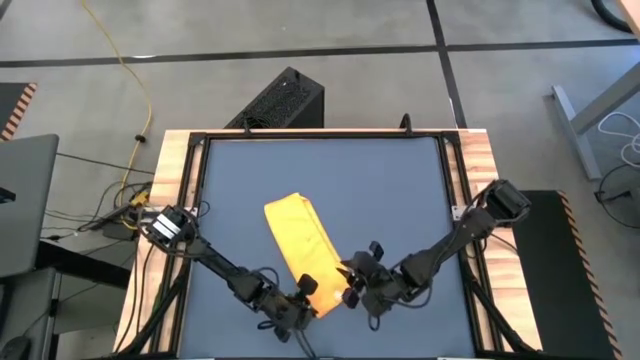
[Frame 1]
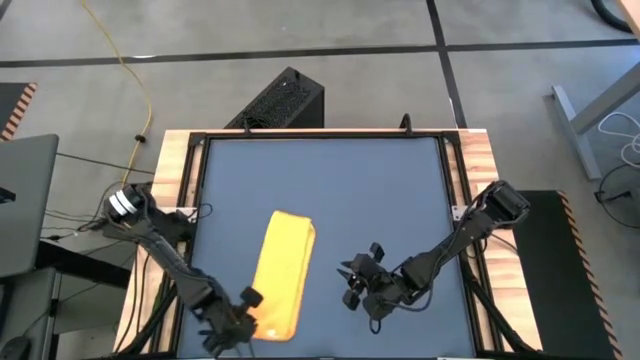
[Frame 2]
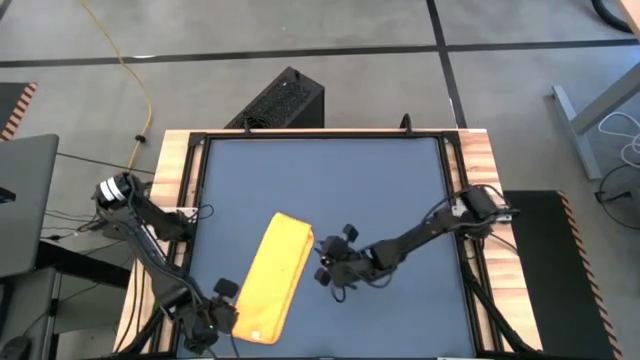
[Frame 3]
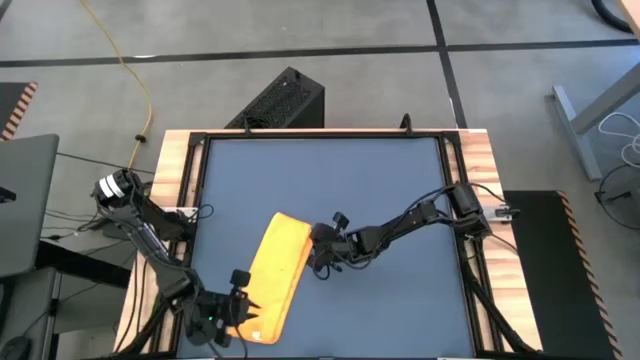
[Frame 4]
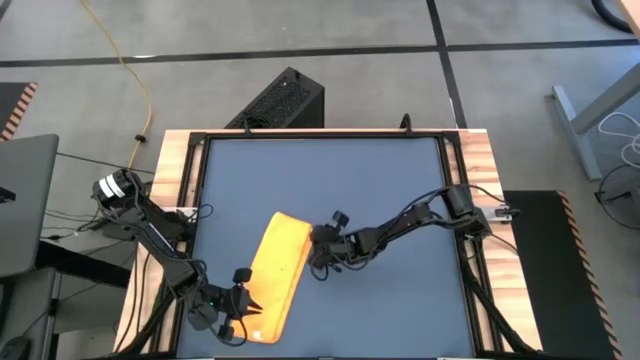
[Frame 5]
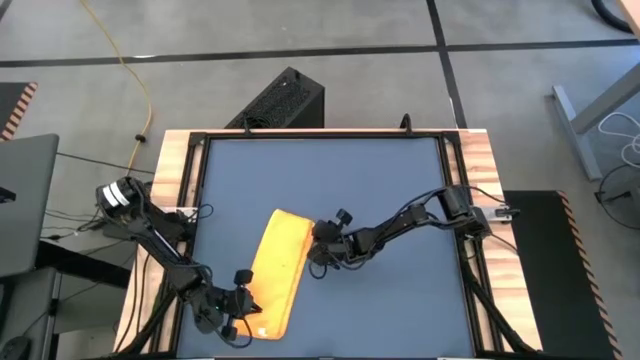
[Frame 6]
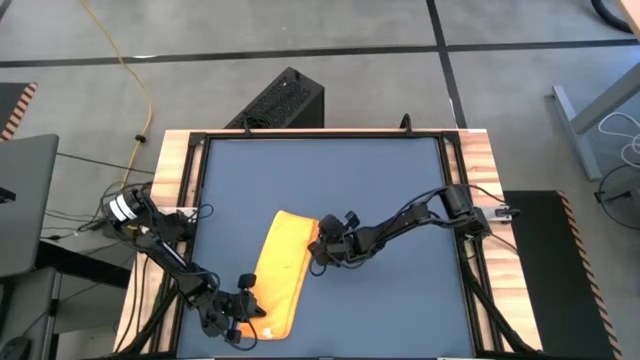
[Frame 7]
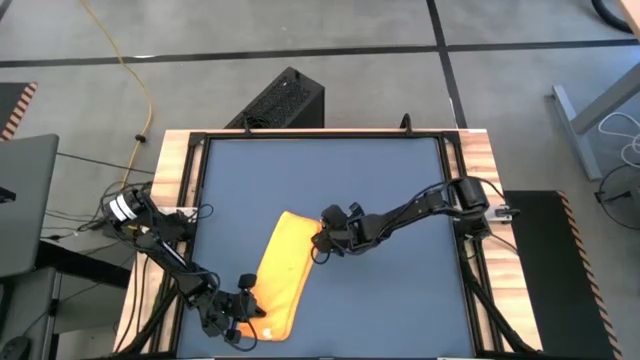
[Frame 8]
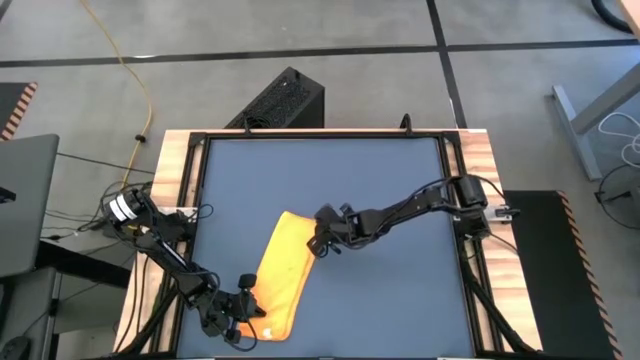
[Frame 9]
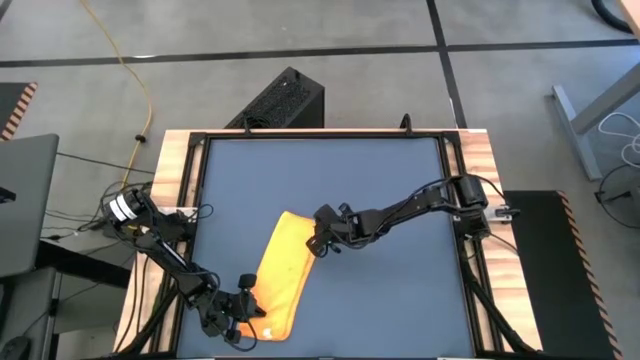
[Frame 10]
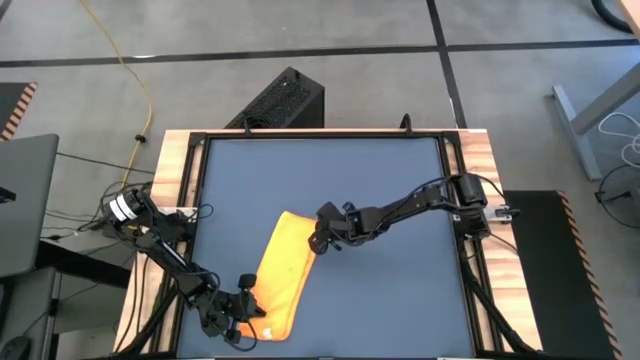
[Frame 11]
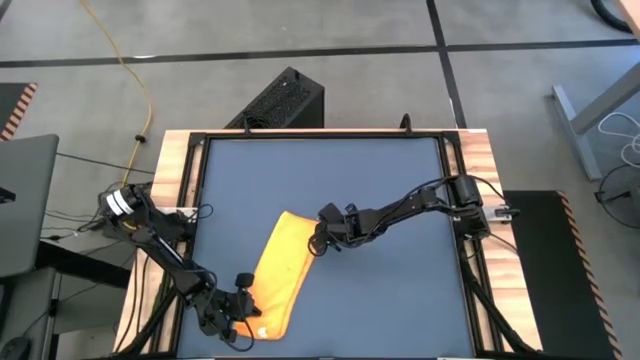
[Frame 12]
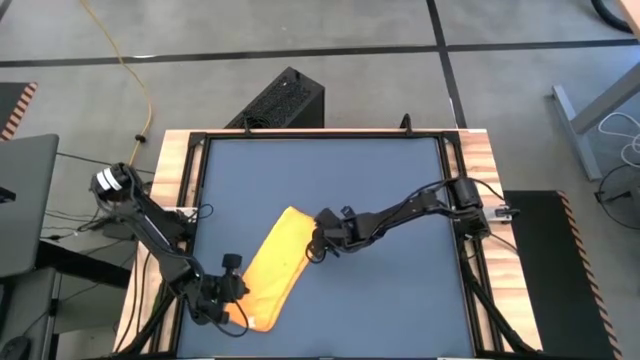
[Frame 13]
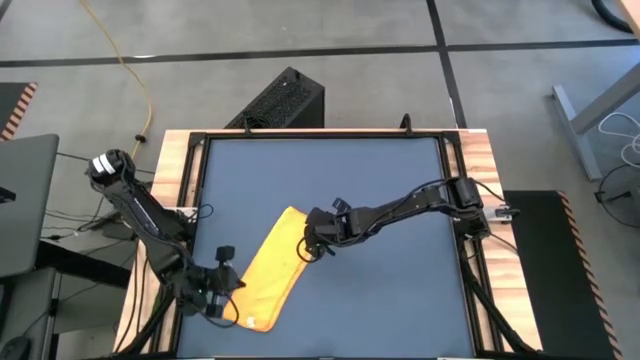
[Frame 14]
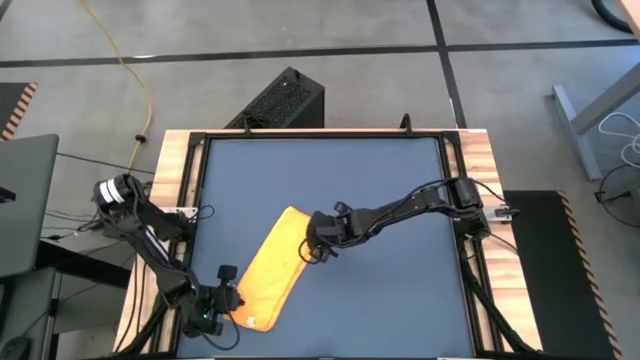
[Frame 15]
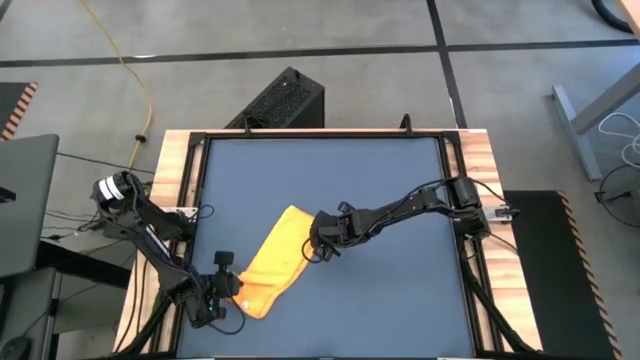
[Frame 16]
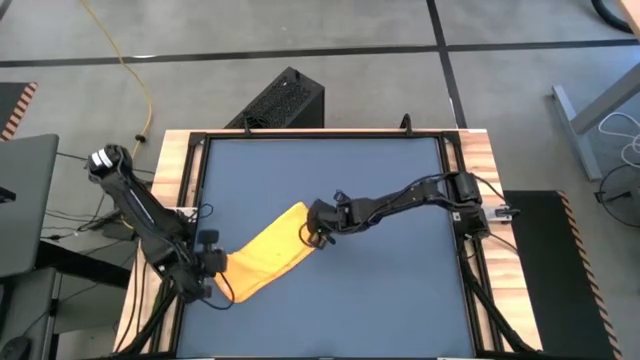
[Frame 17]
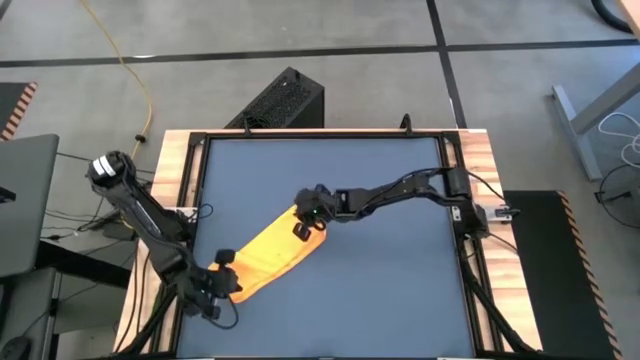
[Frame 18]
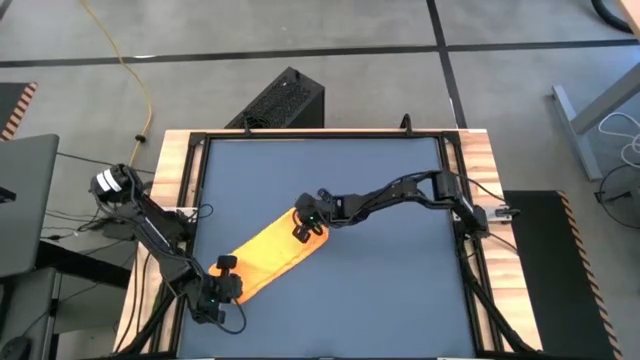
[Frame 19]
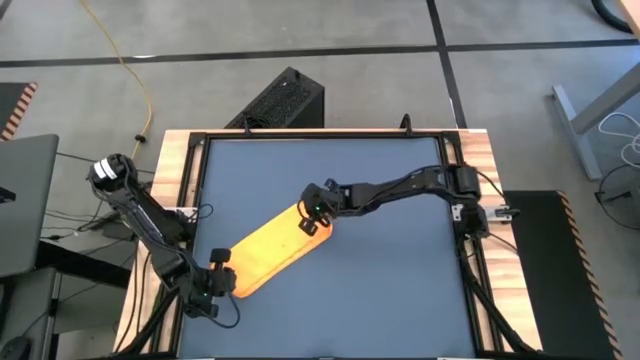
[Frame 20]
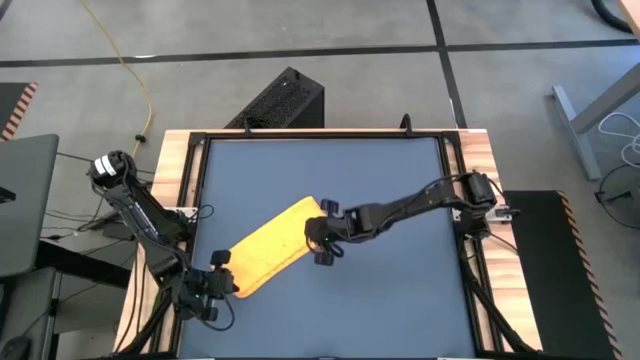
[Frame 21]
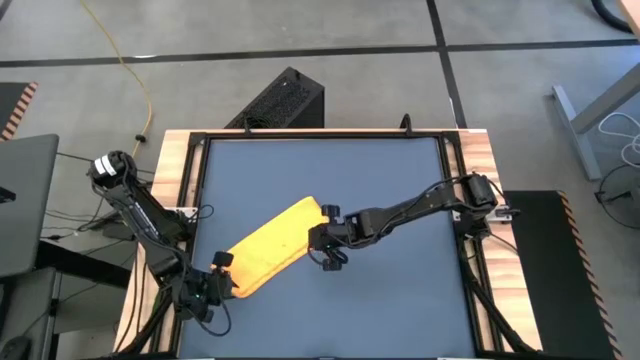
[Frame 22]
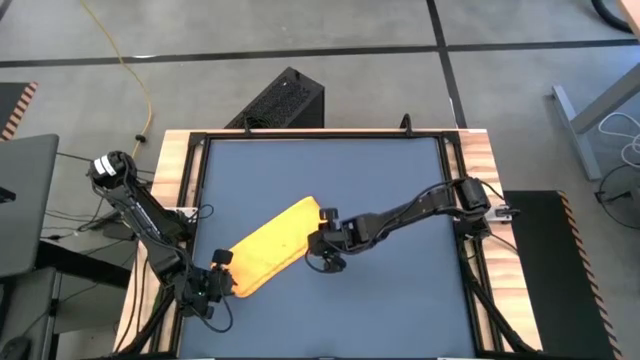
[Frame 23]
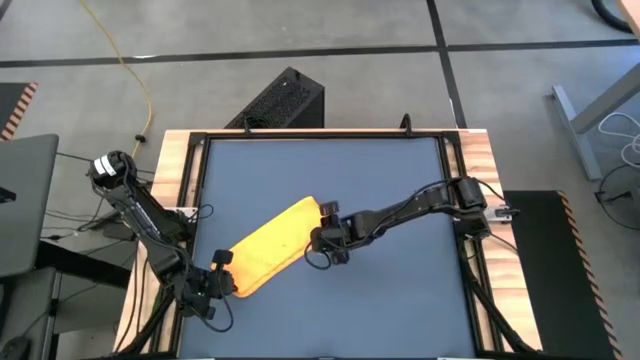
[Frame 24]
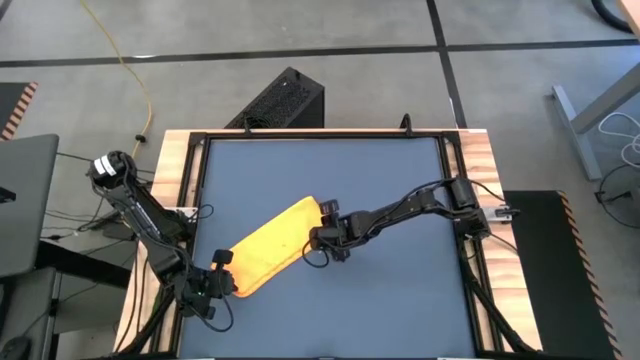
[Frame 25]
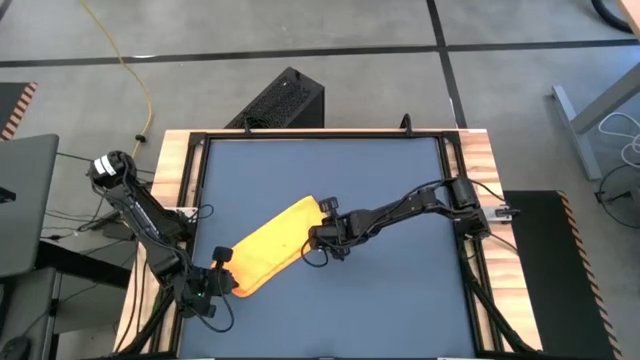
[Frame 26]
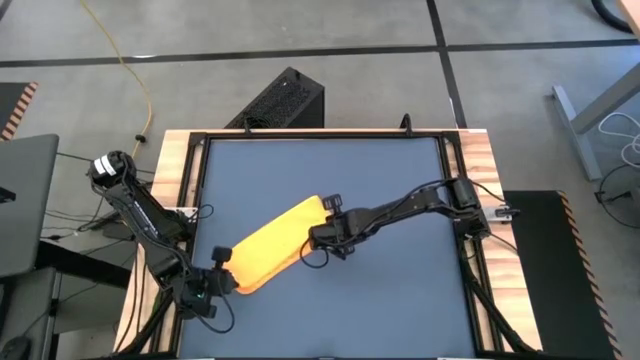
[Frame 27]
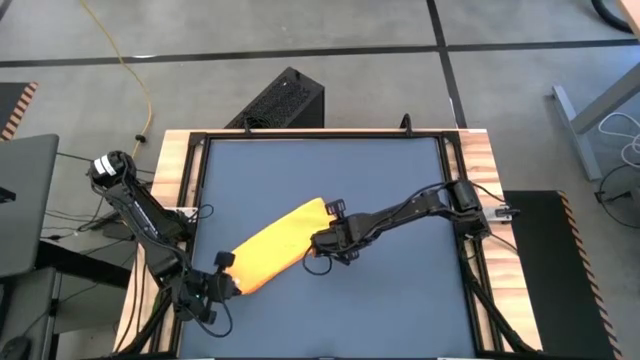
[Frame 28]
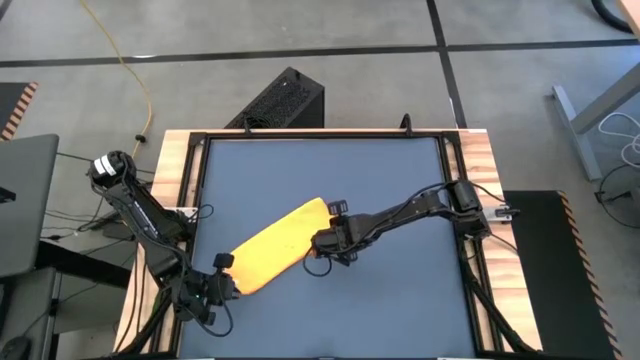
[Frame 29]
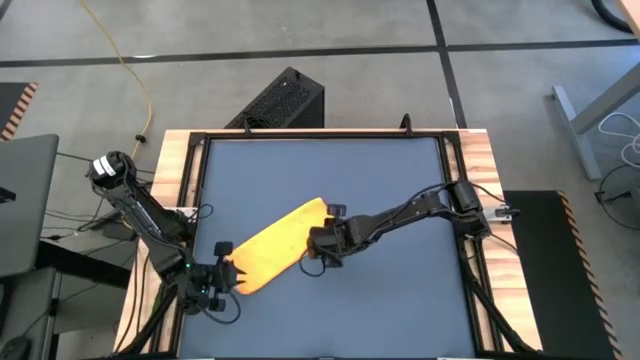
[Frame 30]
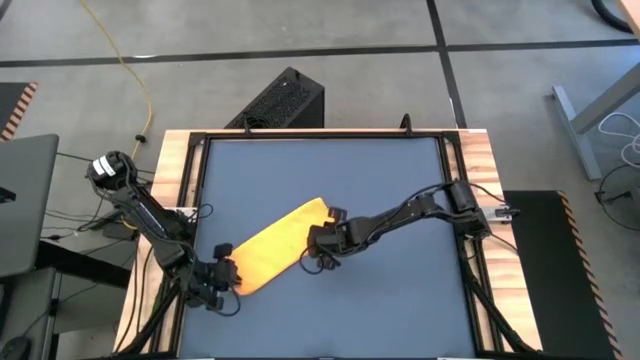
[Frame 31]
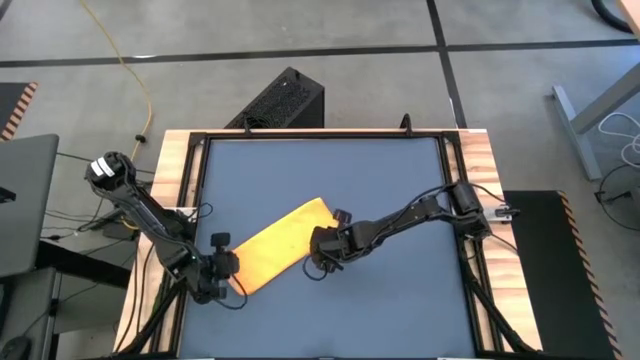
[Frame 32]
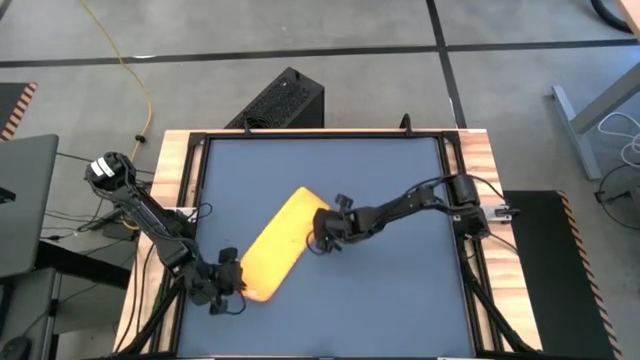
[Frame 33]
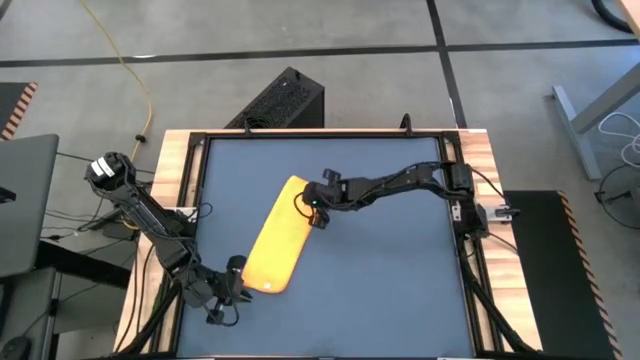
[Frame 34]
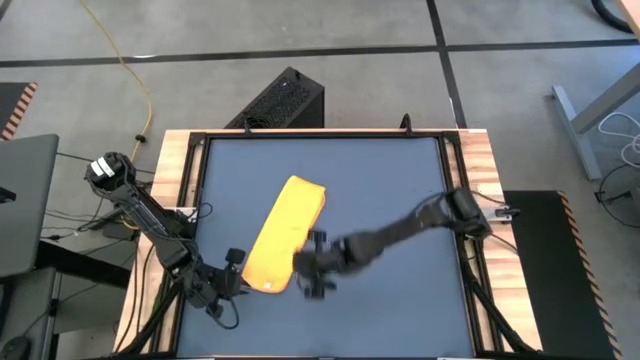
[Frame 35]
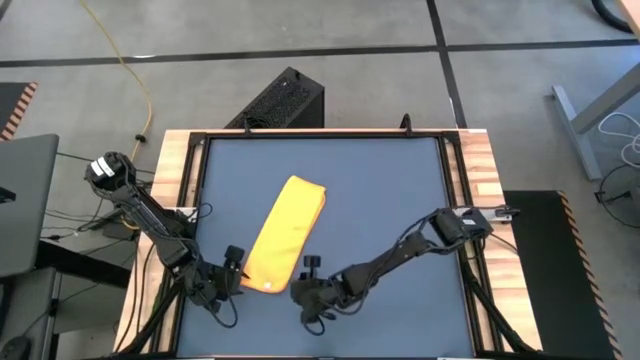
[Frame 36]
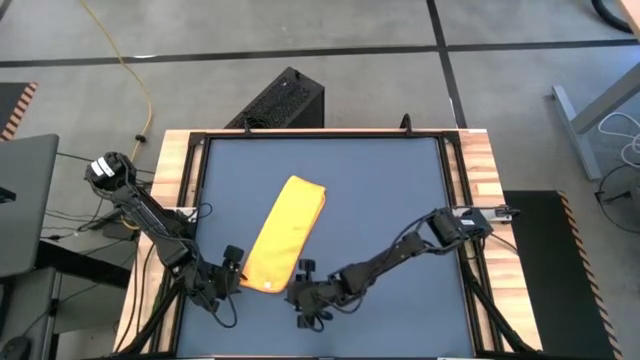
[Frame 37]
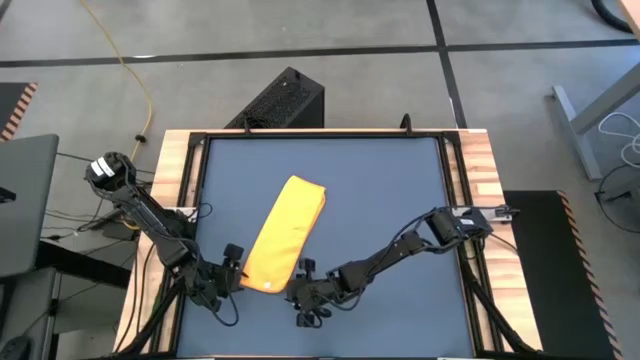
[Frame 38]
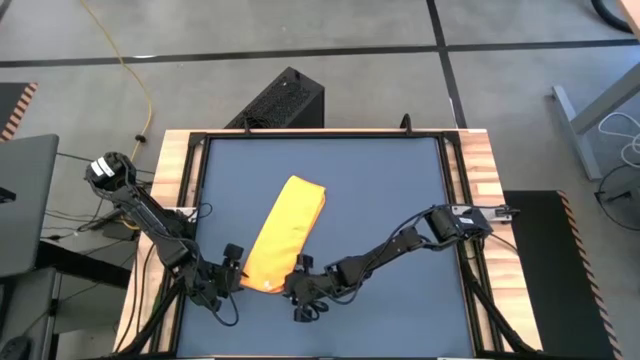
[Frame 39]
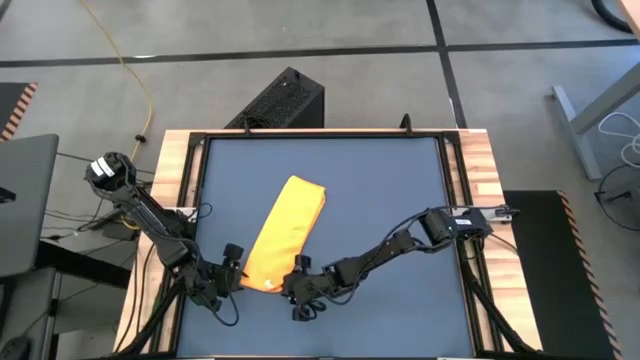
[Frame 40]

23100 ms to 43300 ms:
Task: Roll towel
Roll the yellow microfiber cloth on the table
